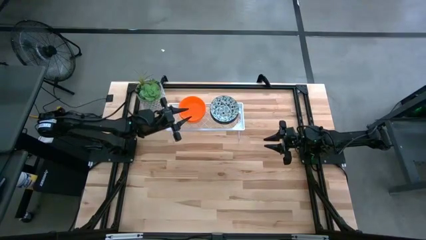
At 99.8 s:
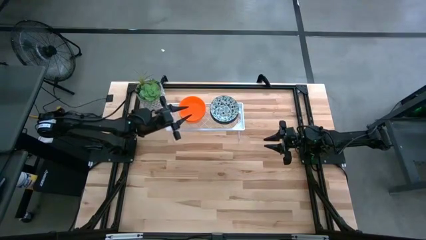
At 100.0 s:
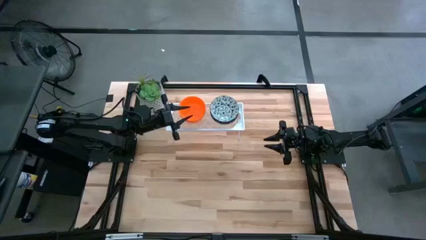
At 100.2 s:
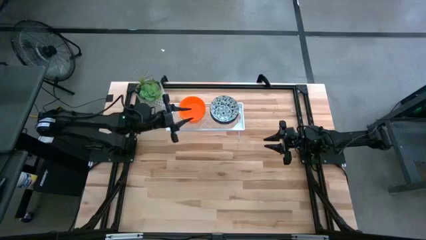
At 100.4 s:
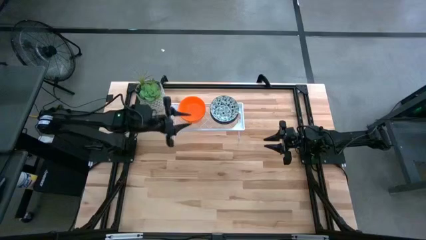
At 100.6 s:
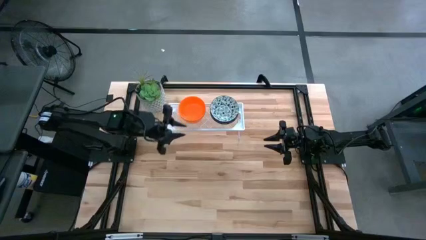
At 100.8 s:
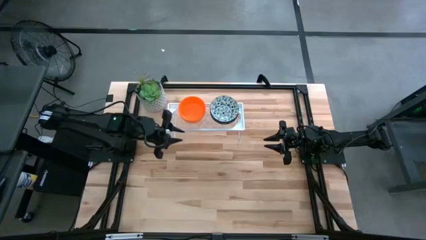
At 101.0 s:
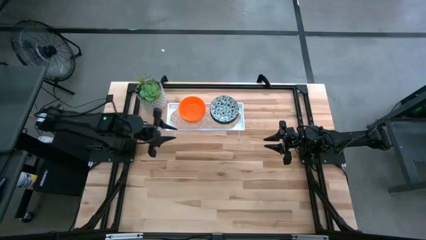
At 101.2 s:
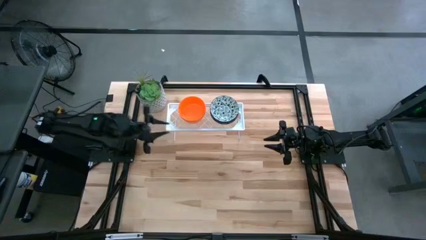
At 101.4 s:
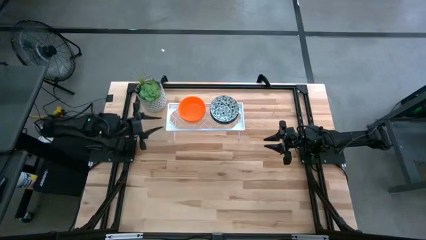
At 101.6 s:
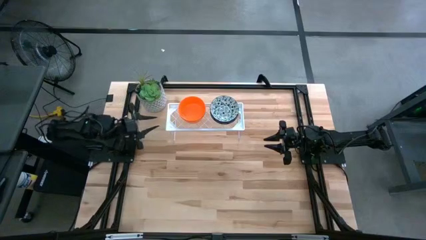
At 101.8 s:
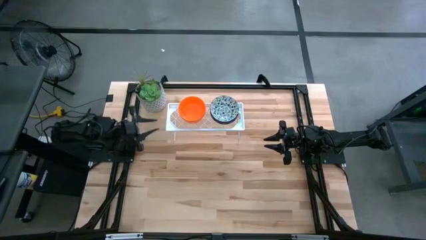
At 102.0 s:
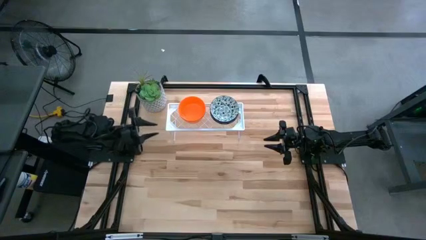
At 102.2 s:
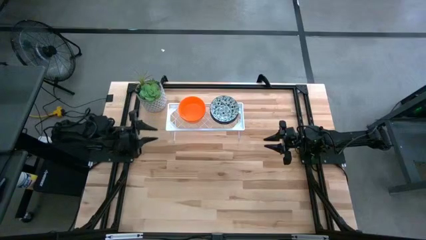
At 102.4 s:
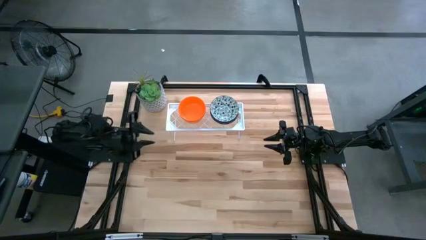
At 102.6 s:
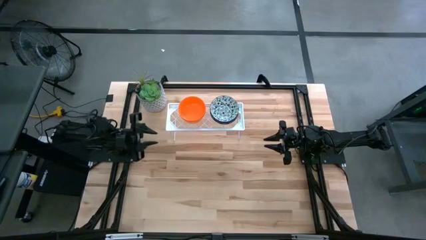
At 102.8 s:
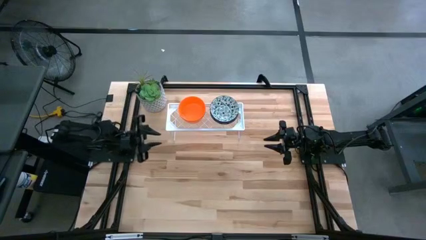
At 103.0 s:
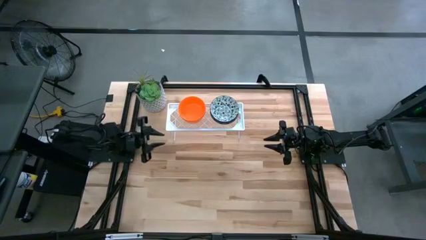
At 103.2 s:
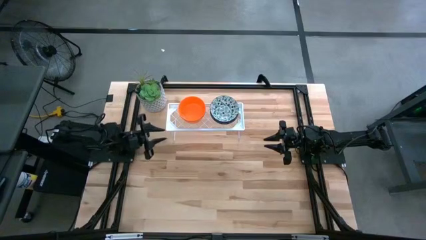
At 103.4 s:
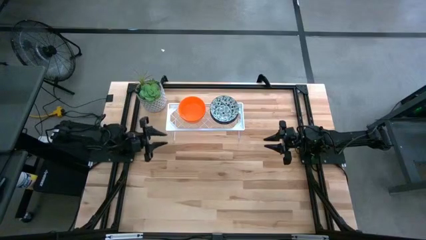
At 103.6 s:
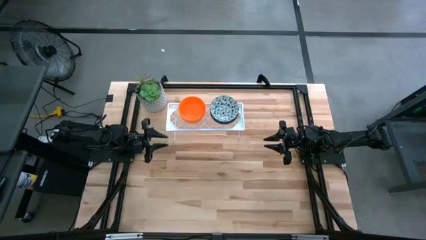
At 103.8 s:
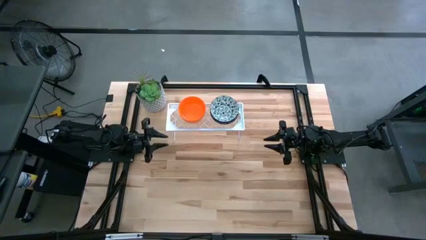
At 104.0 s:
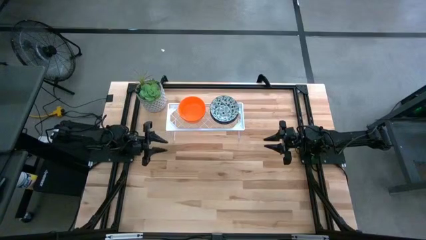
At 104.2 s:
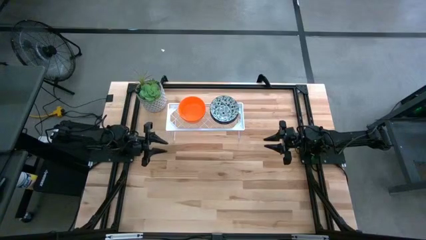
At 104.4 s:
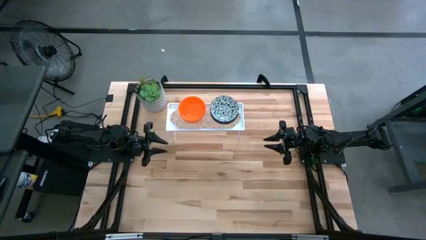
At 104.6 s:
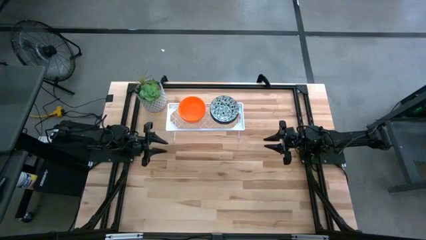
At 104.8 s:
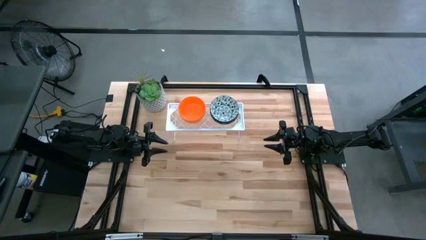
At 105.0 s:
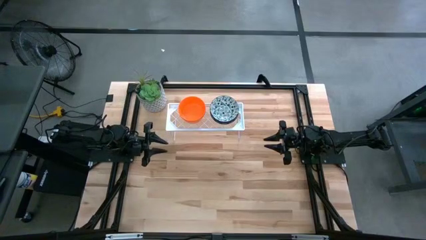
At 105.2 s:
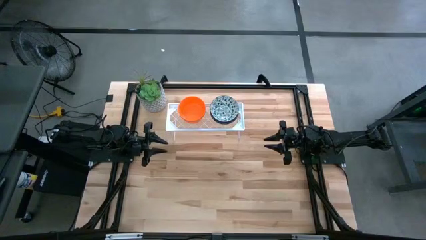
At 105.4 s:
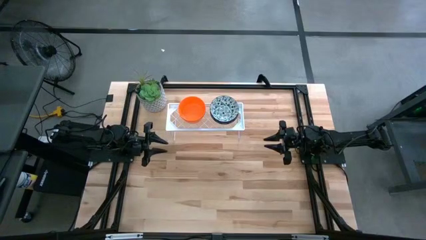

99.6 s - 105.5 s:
Task: Pick & Place Mini bowls
Return to Home Position

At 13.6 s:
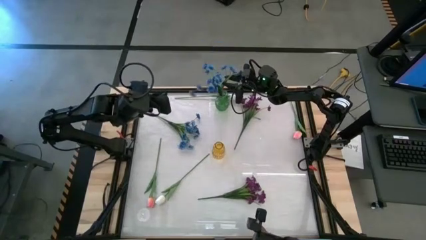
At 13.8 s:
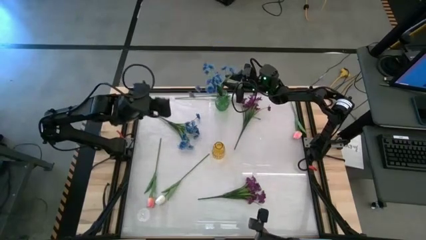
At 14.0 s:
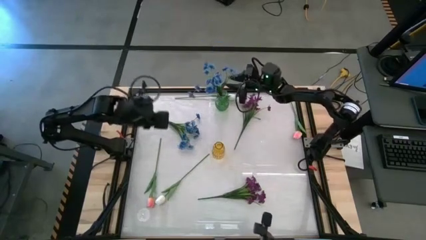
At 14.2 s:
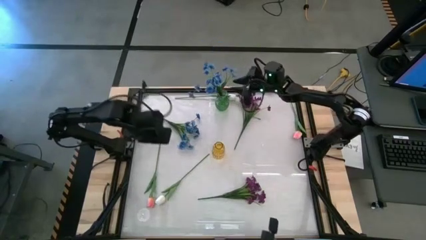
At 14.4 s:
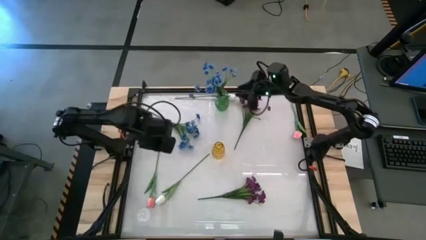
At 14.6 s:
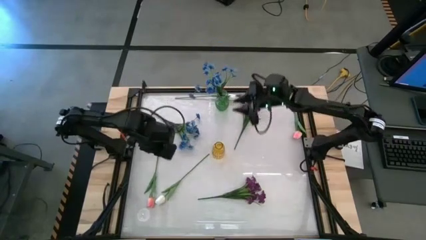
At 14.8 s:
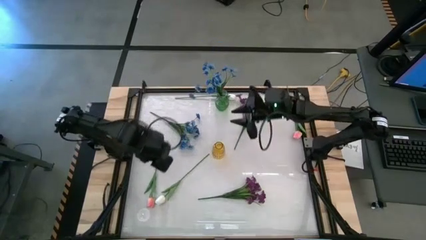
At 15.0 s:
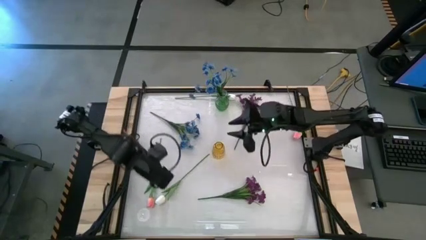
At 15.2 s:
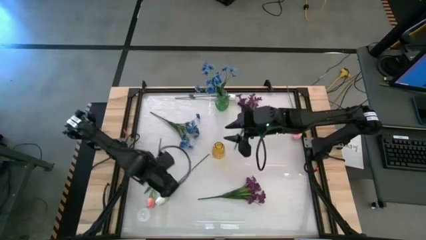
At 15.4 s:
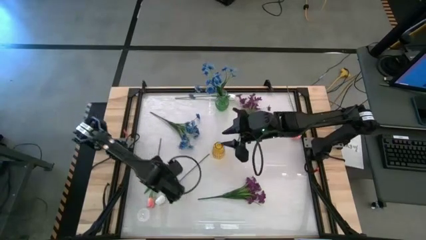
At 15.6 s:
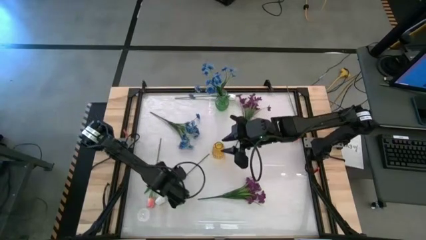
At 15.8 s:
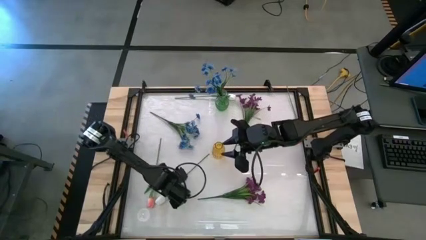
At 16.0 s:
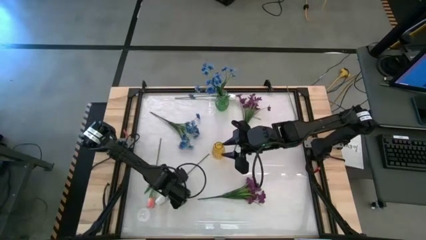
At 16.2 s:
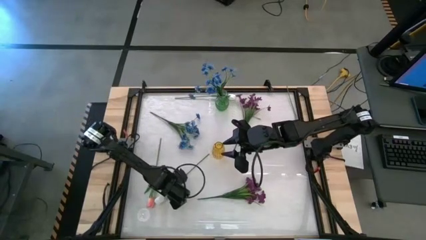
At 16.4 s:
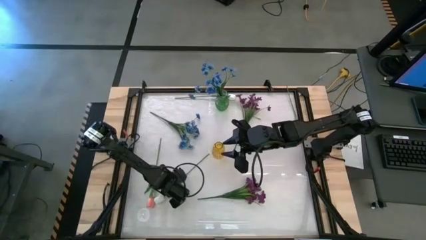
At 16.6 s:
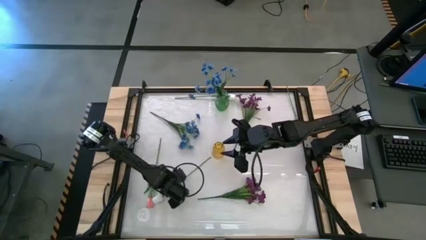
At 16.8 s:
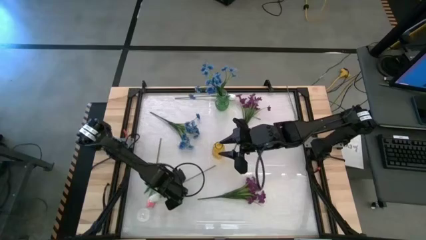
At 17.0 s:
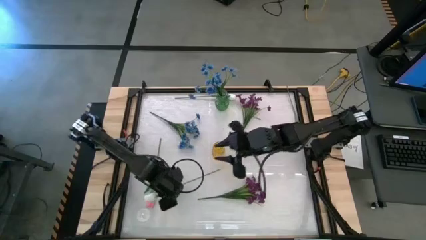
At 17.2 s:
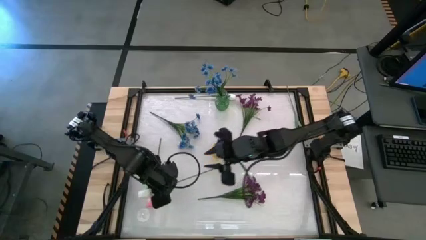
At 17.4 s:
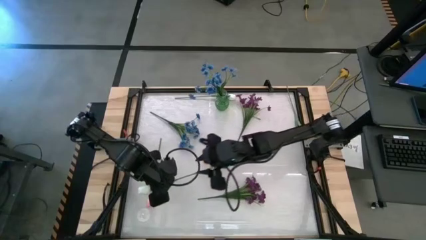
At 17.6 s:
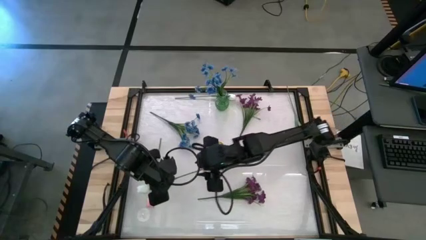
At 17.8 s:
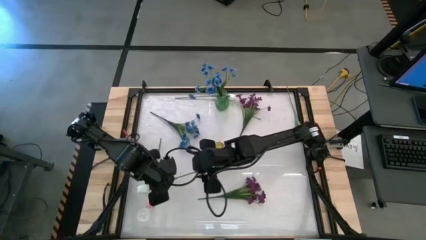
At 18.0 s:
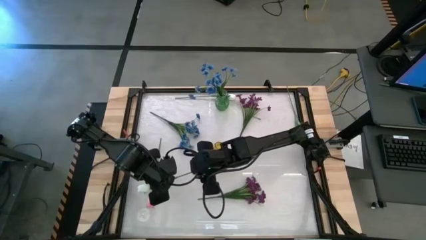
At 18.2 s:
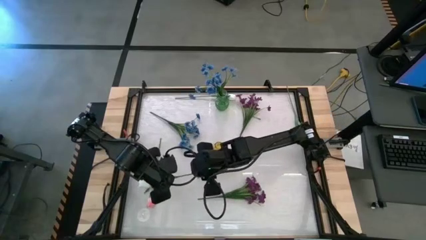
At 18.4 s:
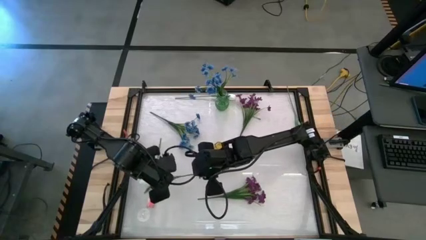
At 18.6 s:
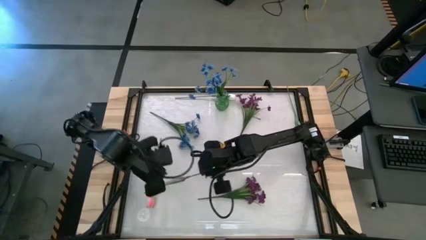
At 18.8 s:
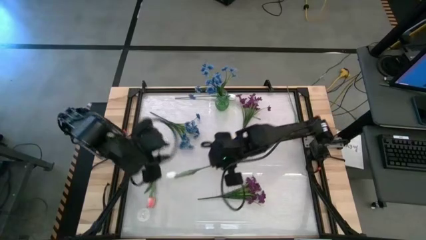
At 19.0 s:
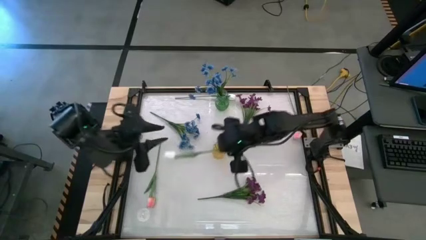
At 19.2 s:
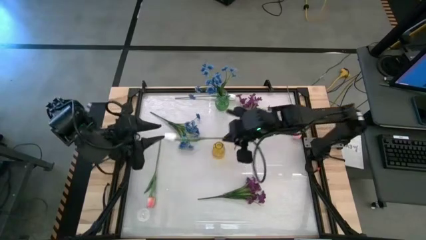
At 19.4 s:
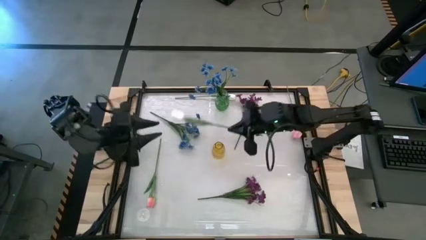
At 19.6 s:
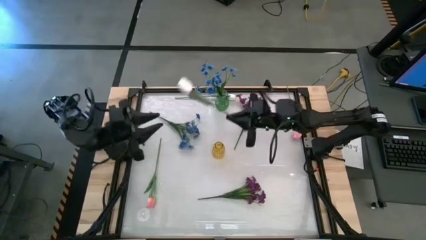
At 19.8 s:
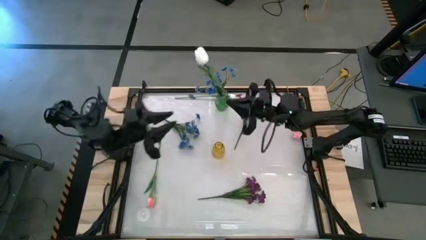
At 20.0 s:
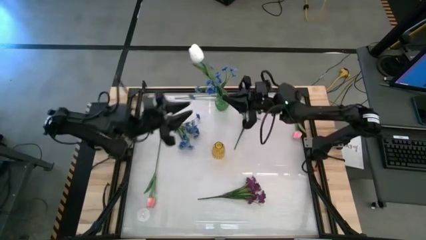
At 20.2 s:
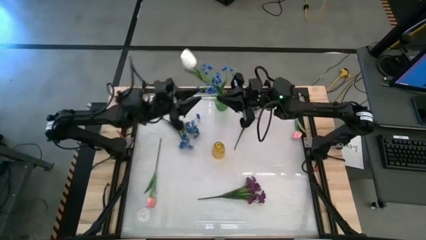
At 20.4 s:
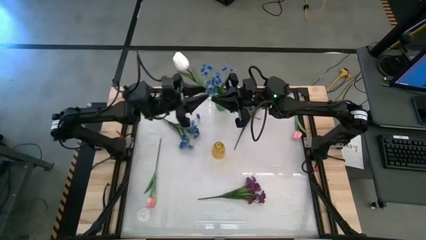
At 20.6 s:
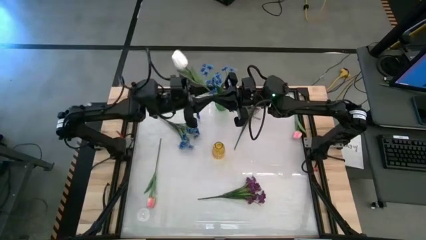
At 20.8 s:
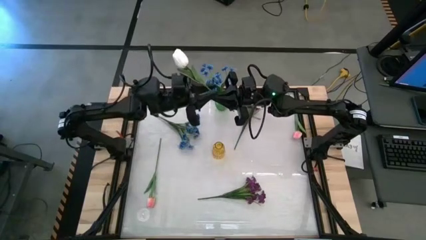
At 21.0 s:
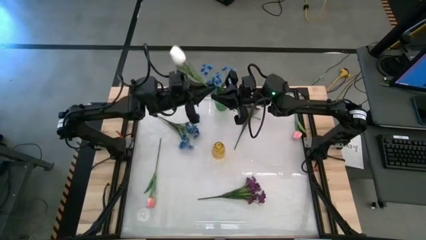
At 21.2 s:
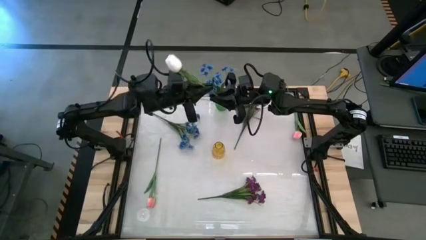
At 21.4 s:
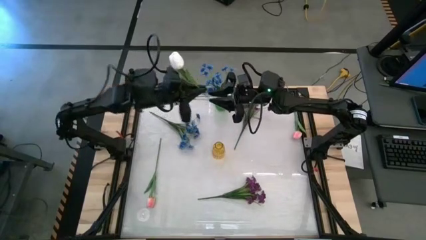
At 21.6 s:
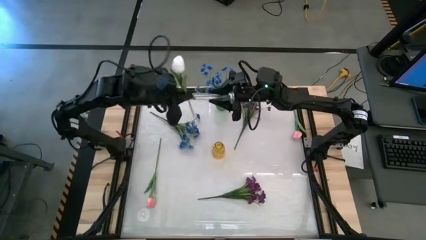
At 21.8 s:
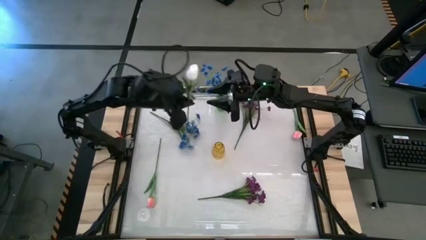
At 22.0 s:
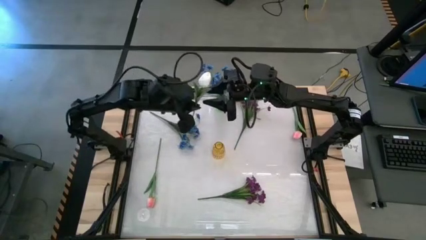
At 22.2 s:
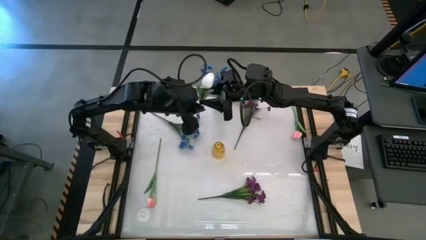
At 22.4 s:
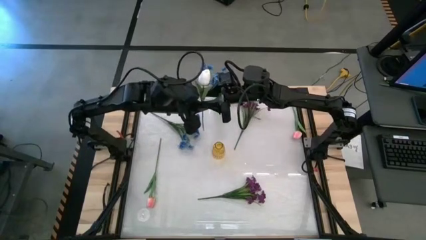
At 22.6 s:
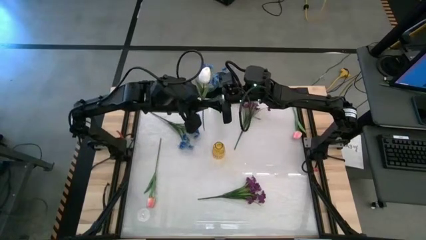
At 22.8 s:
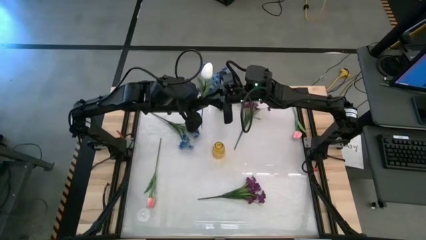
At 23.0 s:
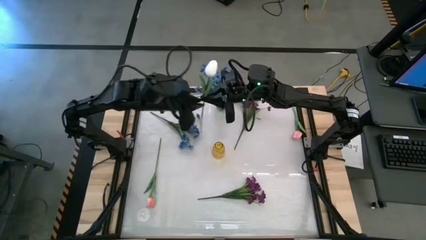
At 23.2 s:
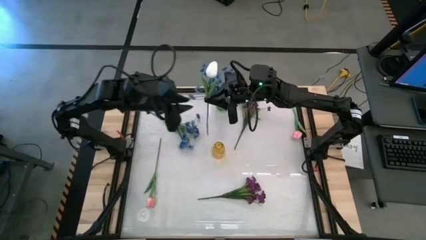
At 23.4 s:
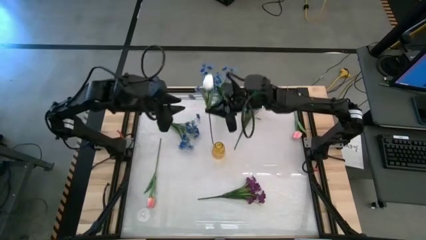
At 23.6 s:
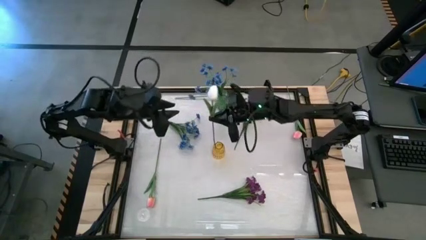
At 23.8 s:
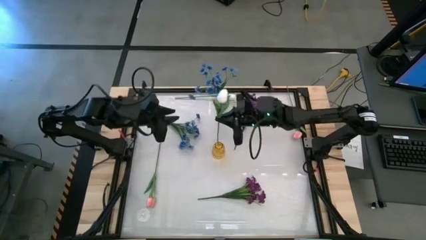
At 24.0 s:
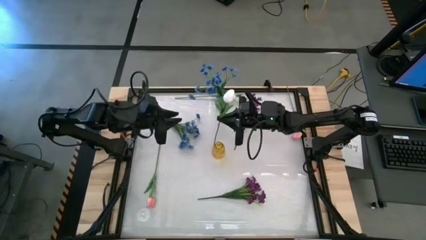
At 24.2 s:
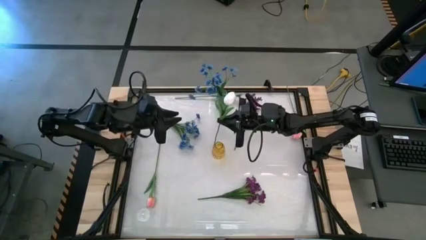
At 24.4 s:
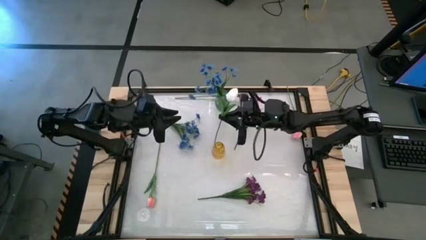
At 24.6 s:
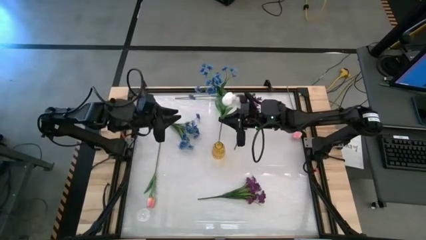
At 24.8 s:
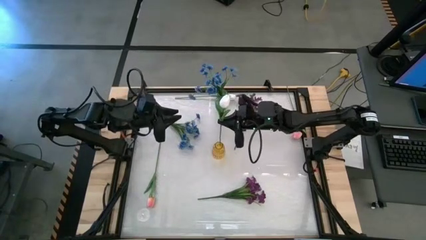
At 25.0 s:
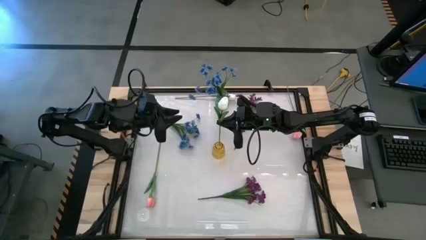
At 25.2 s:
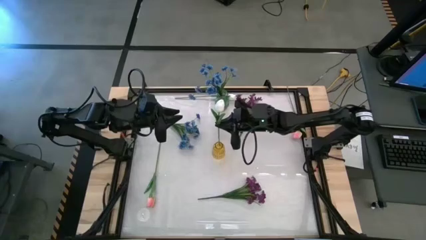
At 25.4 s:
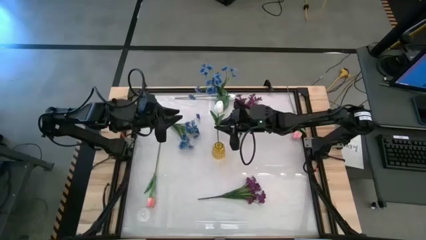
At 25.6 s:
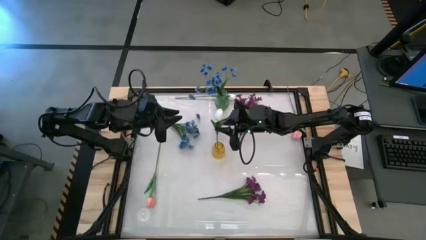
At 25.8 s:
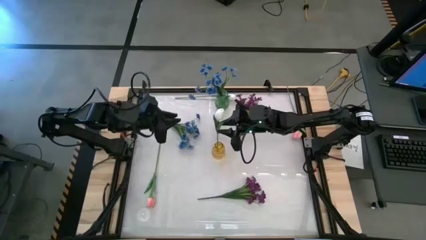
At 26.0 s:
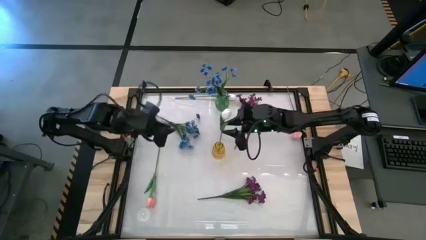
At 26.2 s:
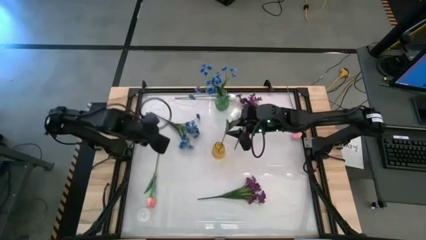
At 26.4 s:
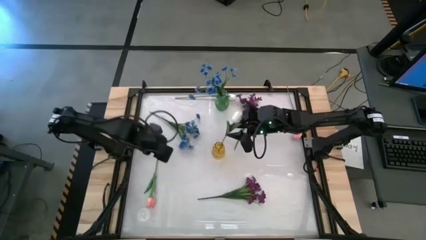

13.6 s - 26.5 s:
Task: Sort flowers into vase by color
Put the bottom white flower into the yellow vase
